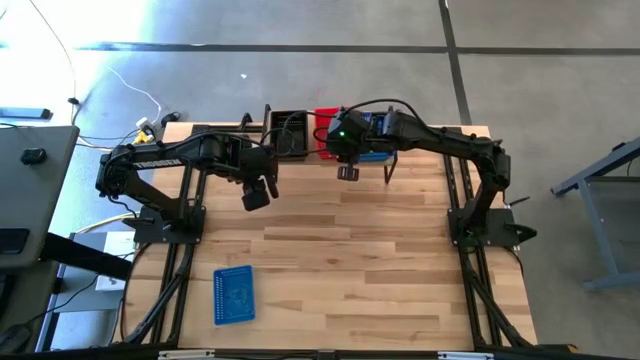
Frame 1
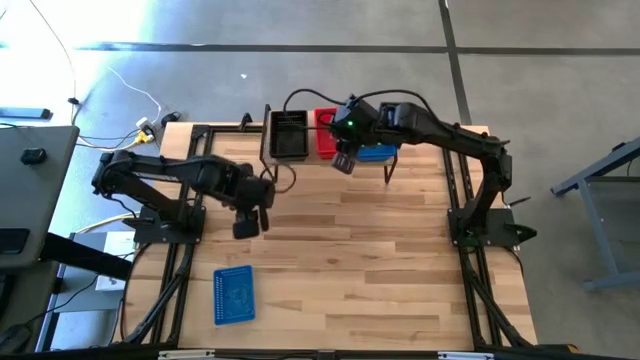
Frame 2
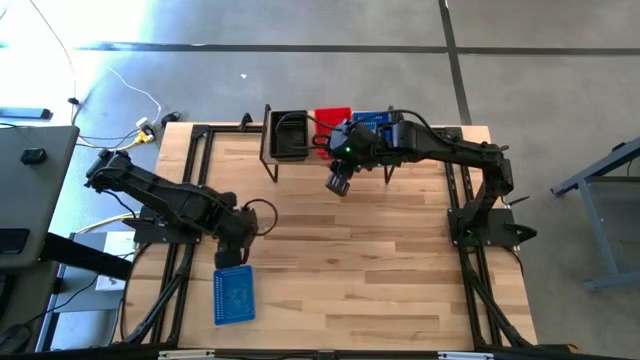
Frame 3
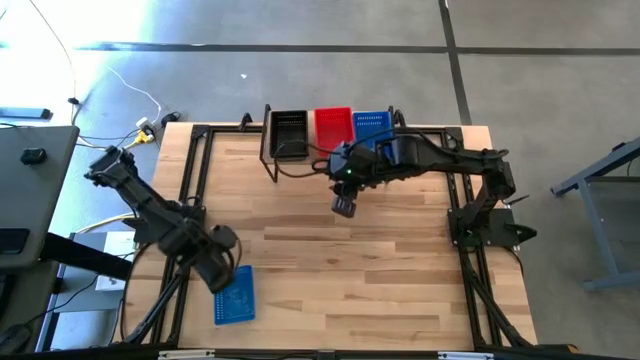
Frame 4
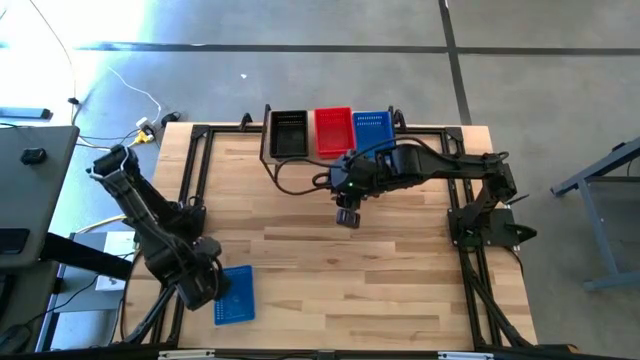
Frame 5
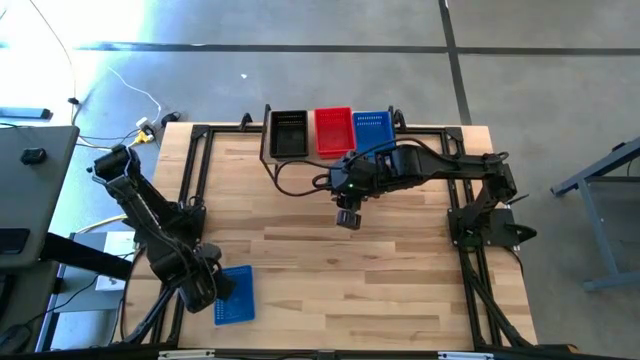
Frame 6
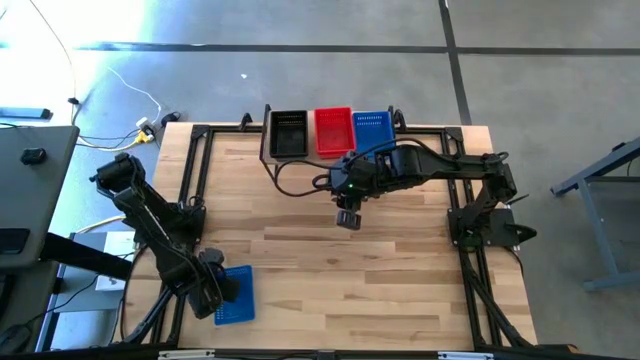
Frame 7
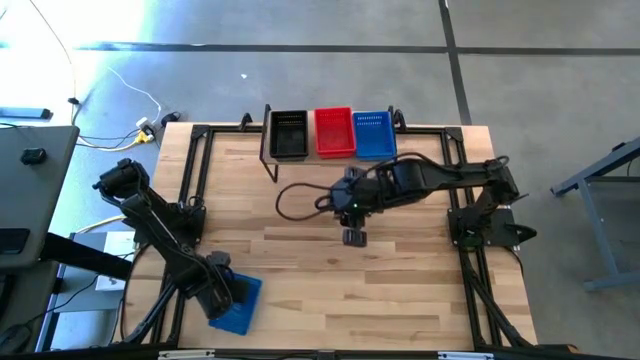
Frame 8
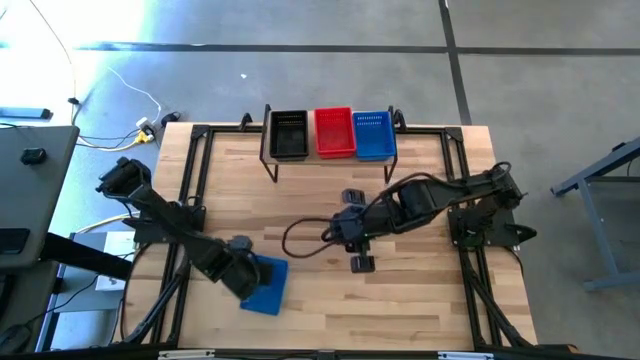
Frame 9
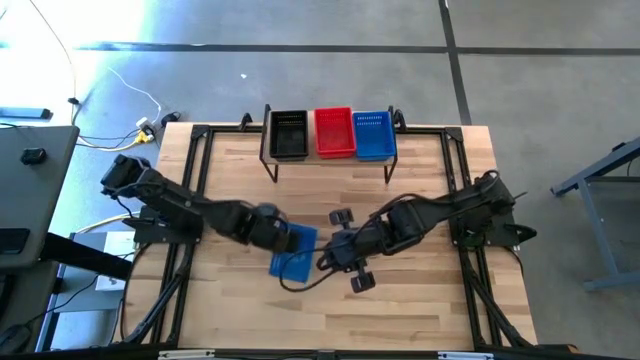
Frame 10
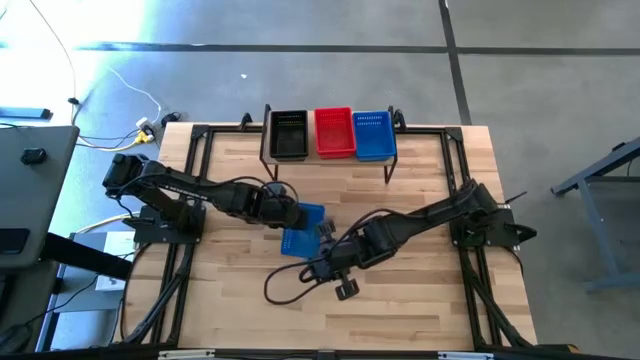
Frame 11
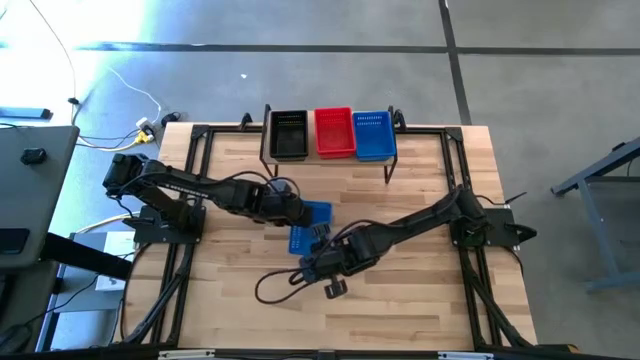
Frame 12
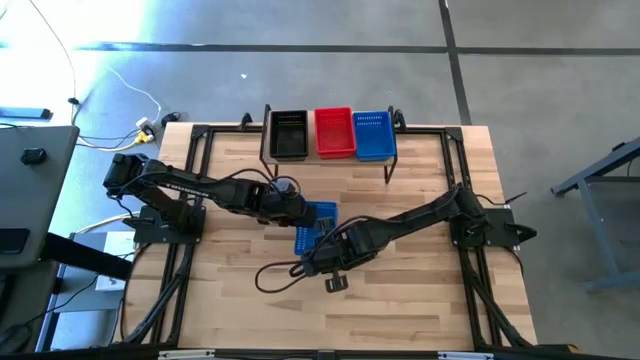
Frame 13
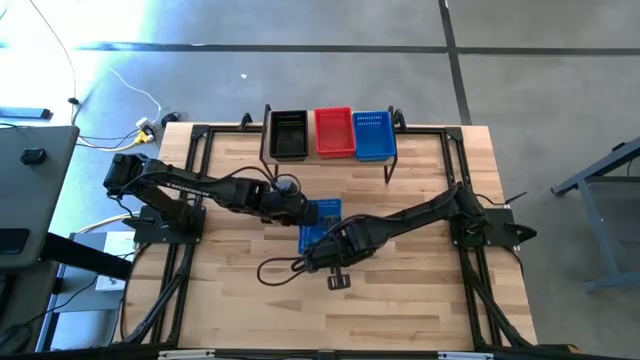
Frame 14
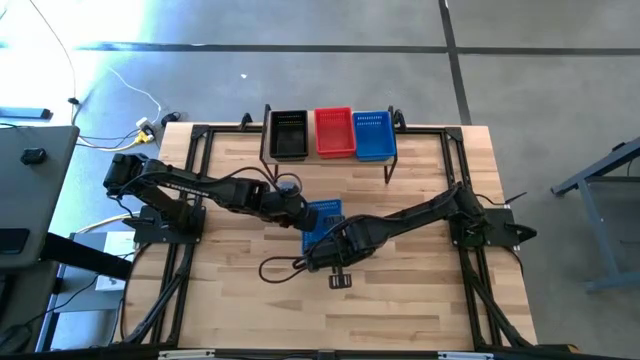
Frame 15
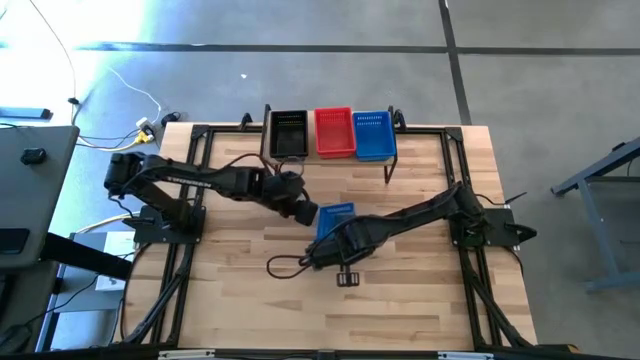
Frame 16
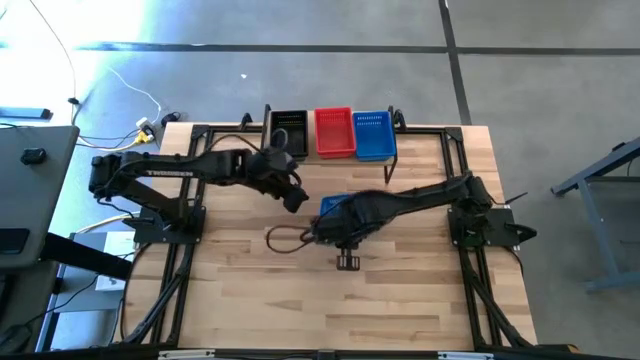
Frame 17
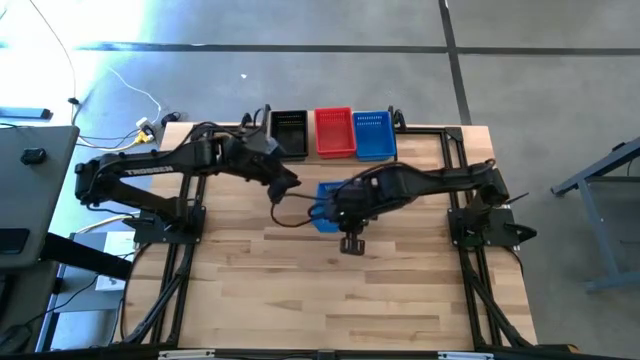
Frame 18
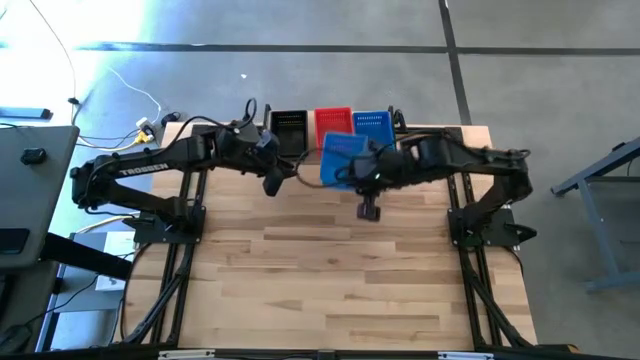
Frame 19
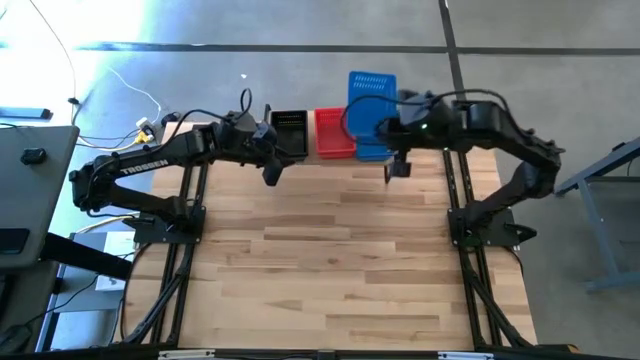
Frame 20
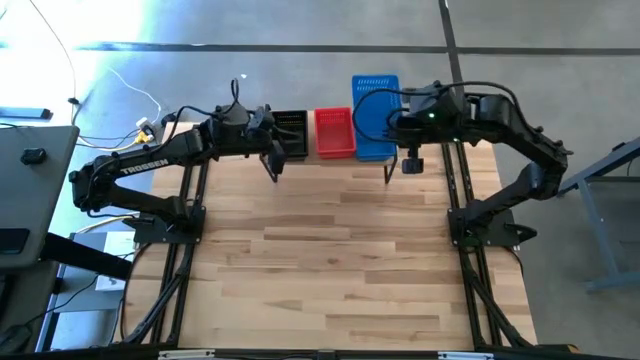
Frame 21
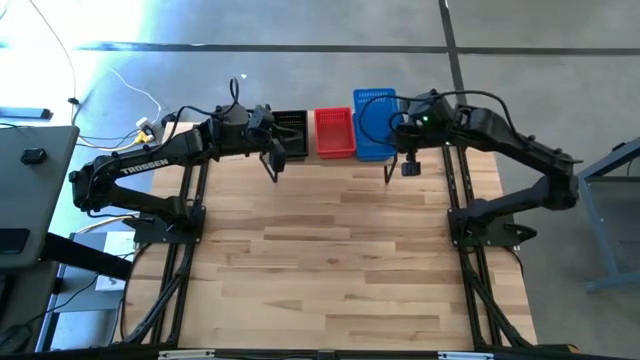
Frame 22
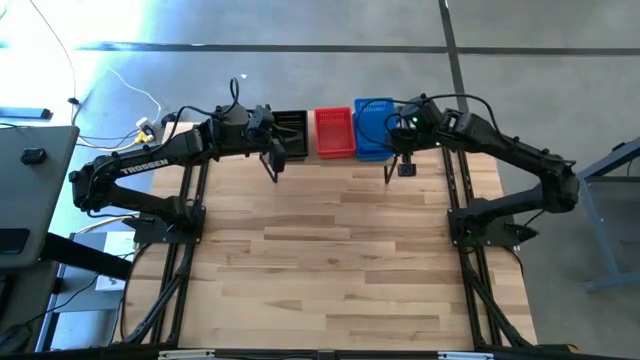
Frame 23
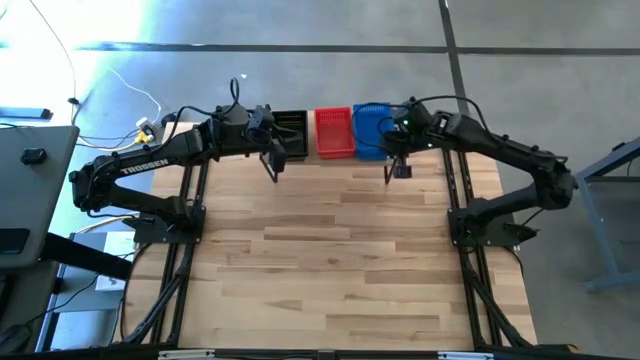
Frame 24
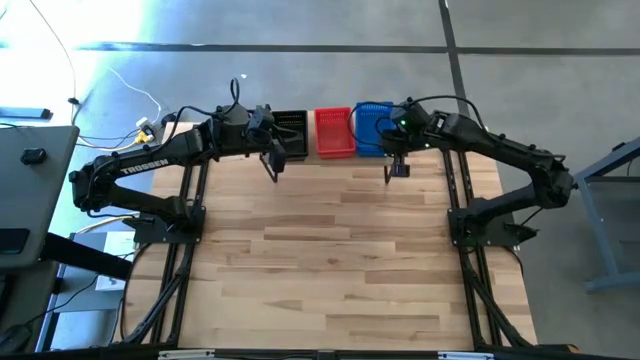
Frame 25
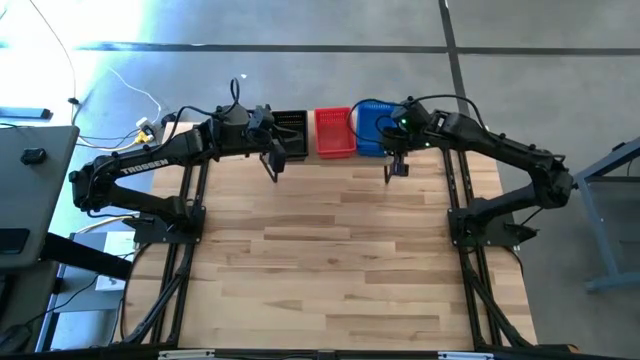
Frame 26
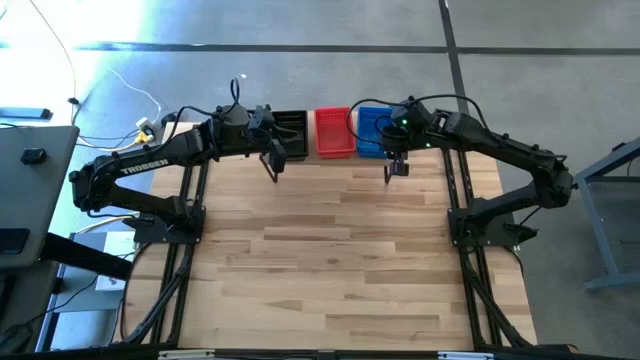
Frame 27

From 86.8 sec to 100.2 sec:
Task: Stack baskets on shelf by color
Stack the blue bin on top of the blue bin on the shelf

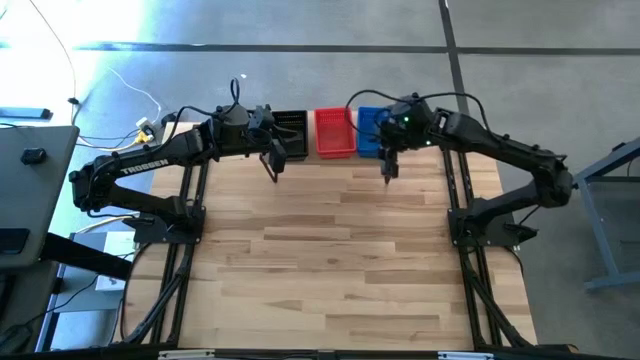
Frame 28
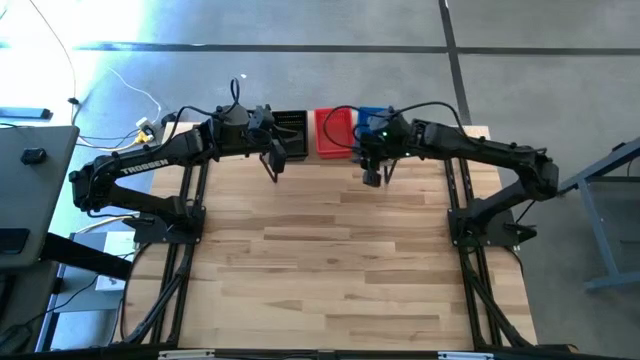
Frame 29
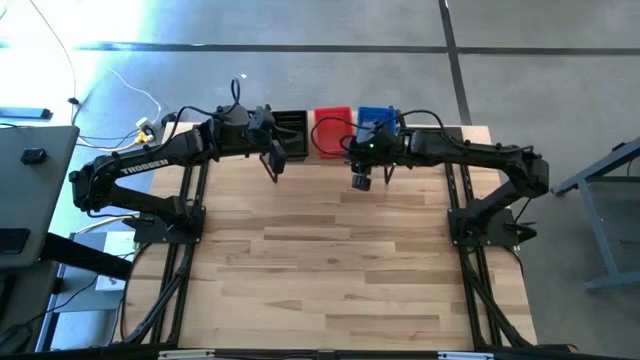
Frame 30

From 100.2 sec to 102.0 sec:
Adjust the stacked red bins on the shelf

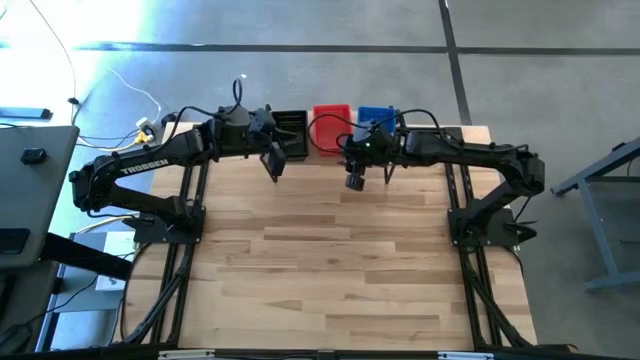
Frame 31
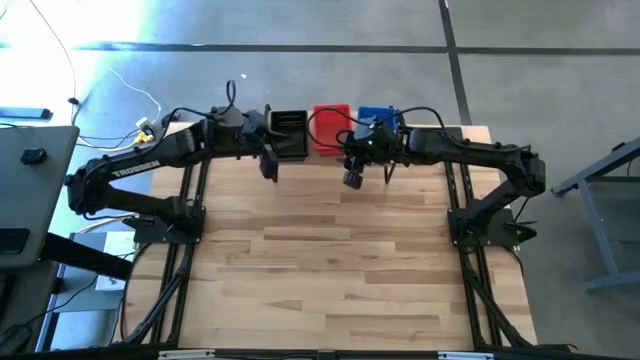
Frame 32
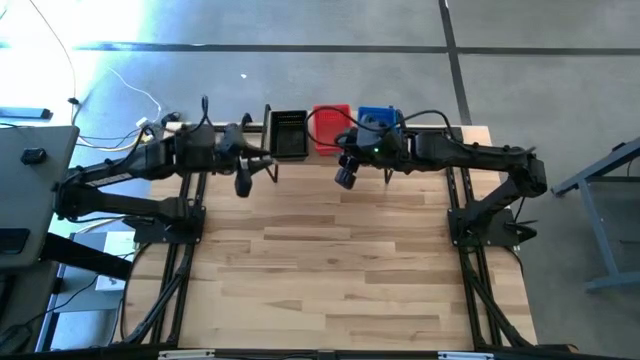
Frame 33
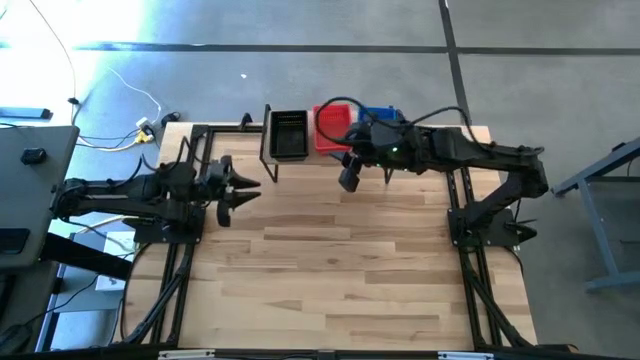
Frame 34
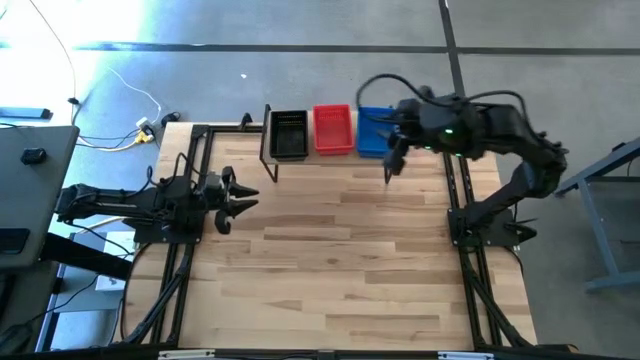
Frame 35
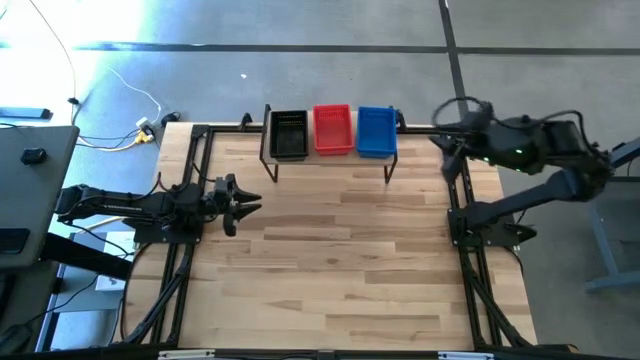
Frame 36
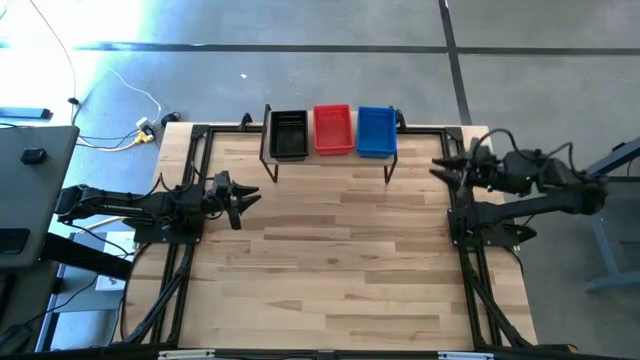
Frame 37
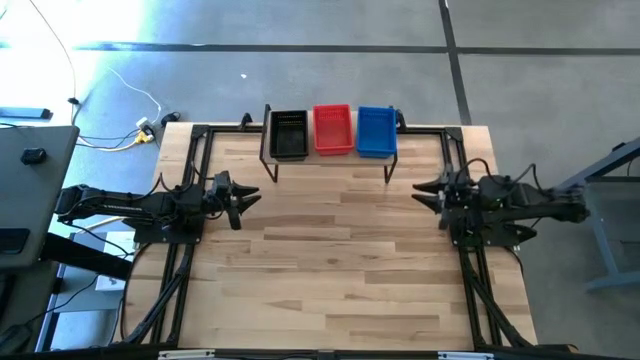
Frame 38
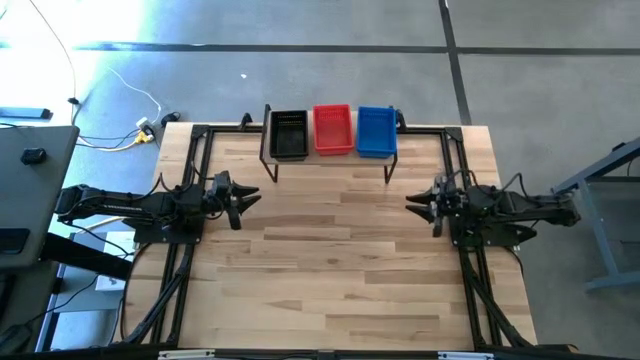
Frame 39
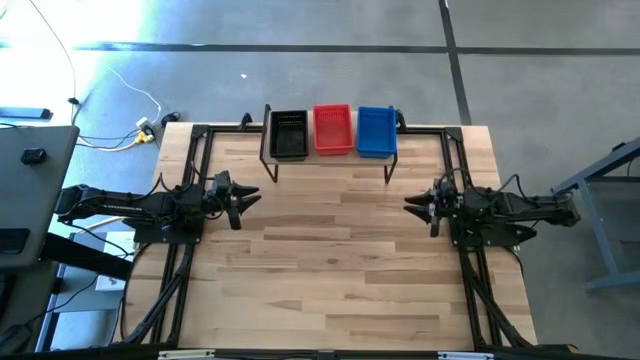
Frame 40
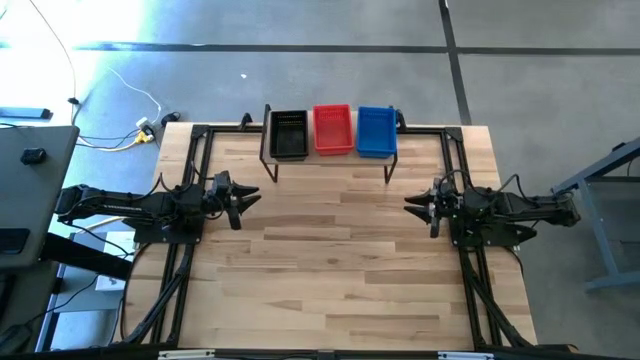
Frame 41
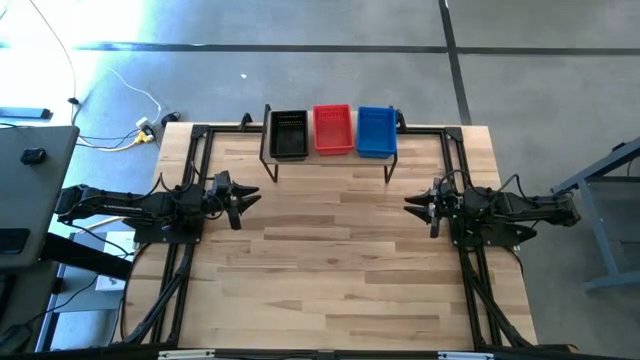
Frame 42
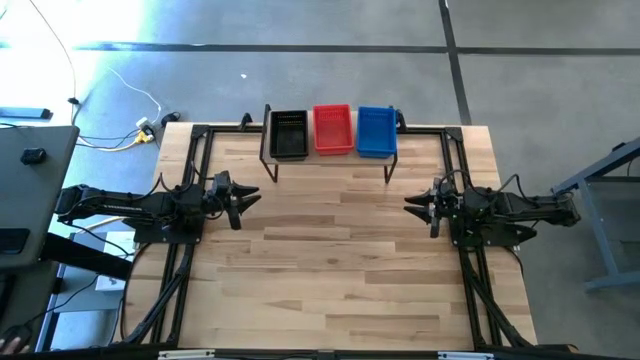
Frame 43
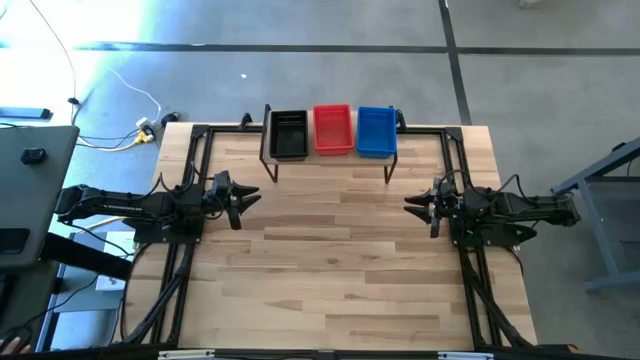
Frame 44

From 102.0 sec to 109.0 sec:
Return to Home Position
